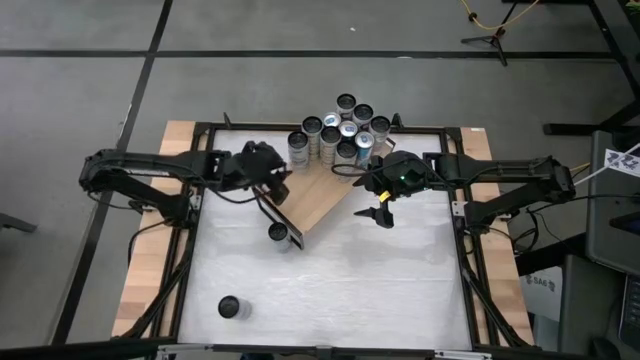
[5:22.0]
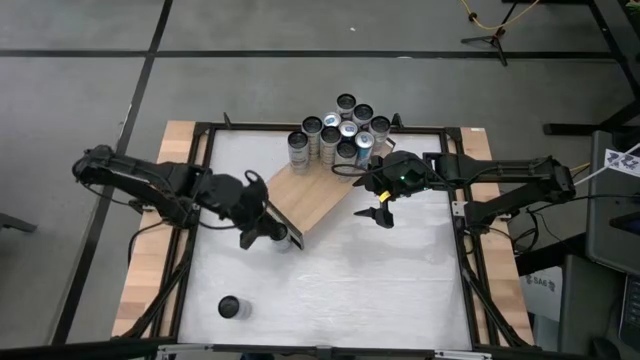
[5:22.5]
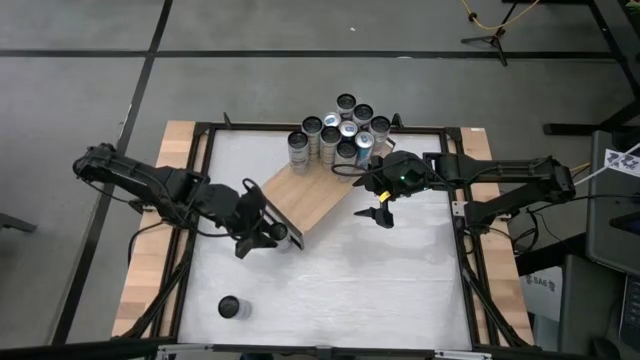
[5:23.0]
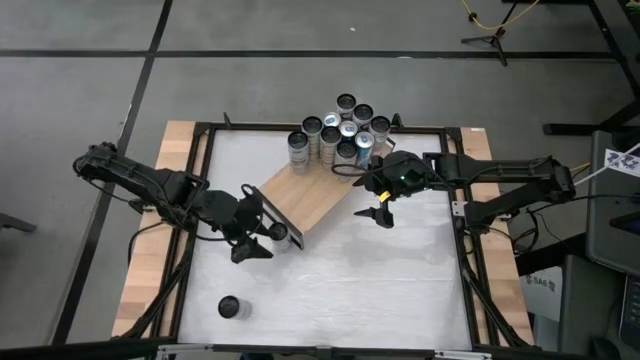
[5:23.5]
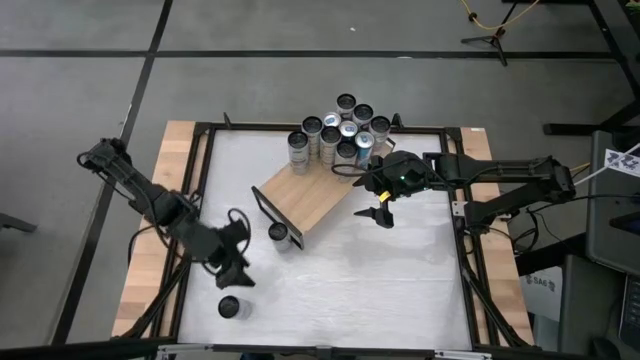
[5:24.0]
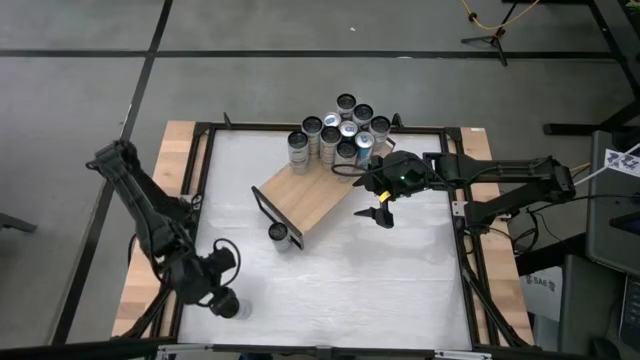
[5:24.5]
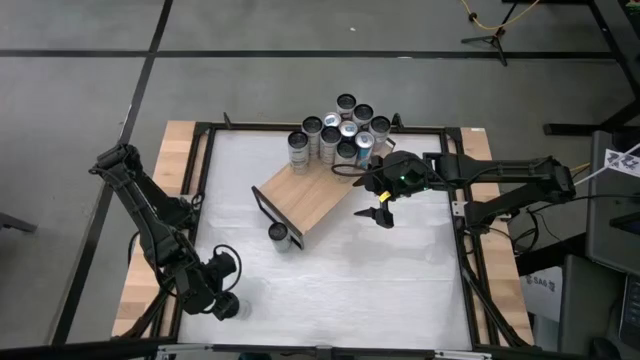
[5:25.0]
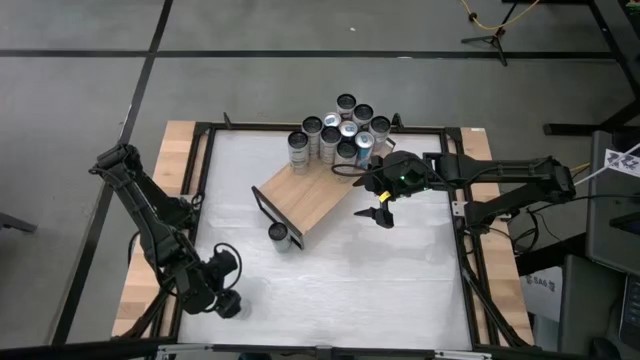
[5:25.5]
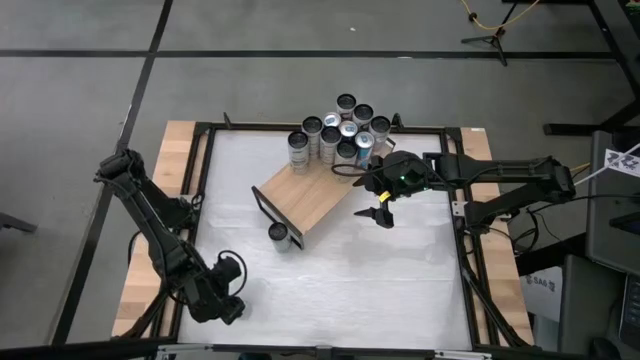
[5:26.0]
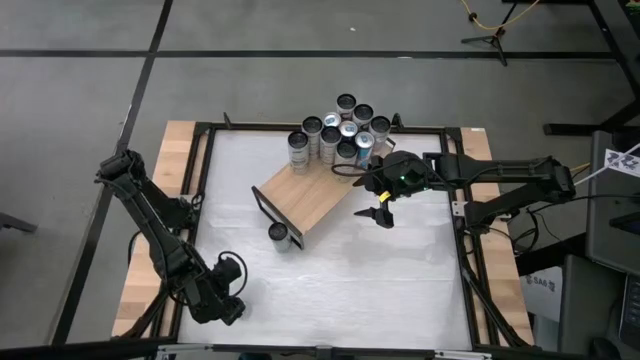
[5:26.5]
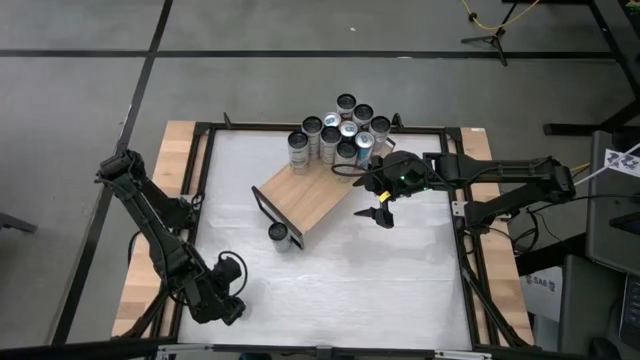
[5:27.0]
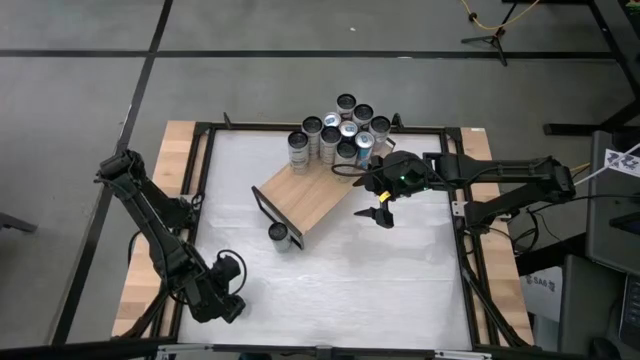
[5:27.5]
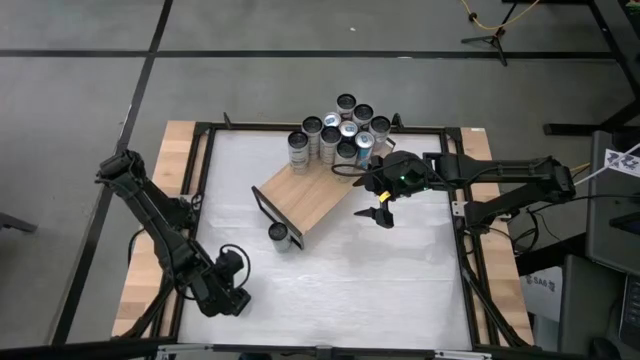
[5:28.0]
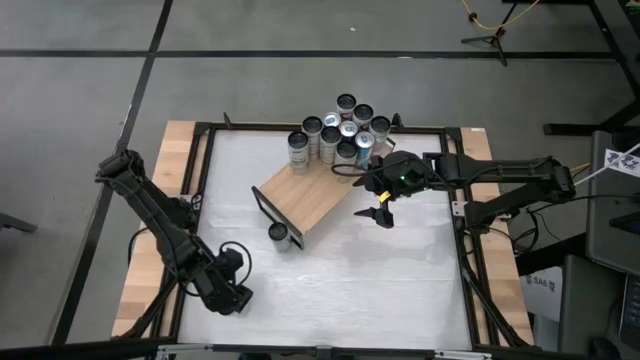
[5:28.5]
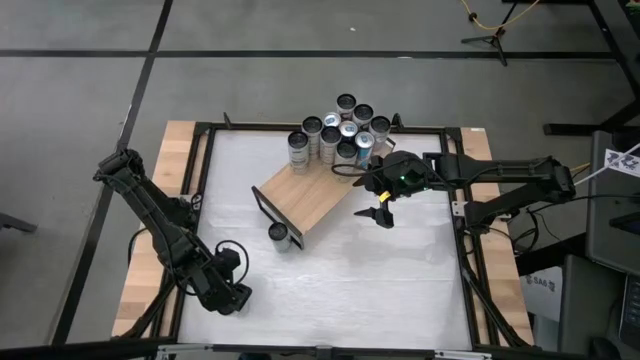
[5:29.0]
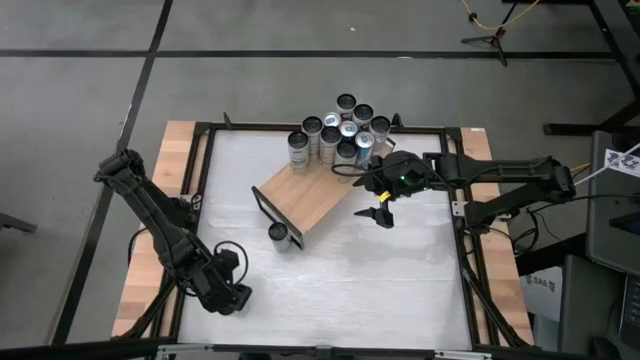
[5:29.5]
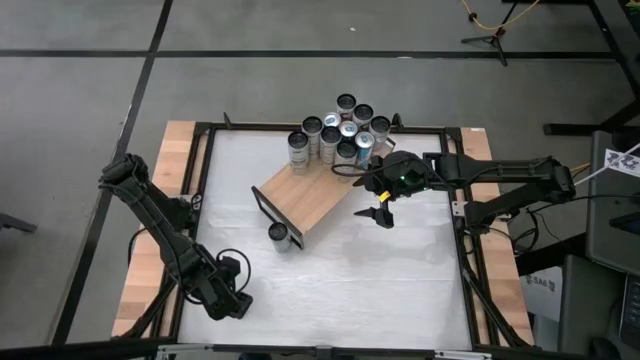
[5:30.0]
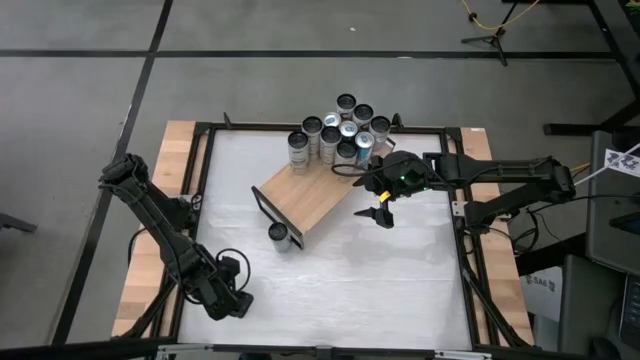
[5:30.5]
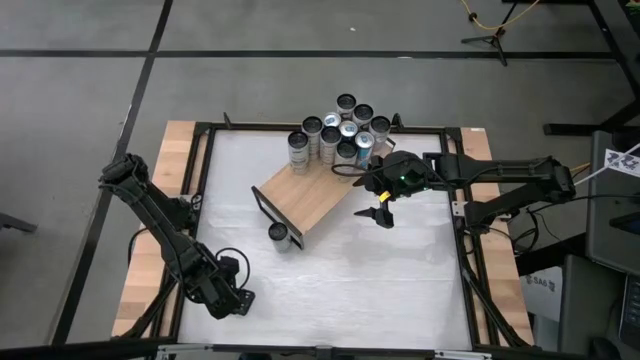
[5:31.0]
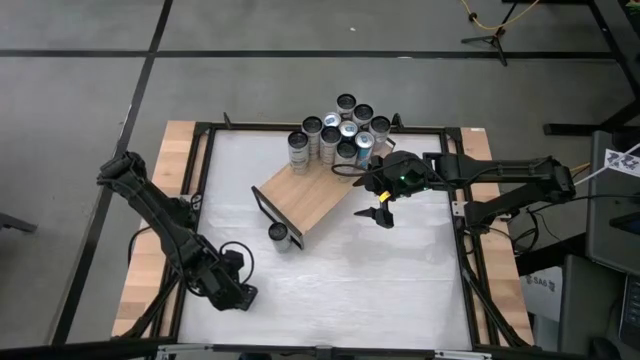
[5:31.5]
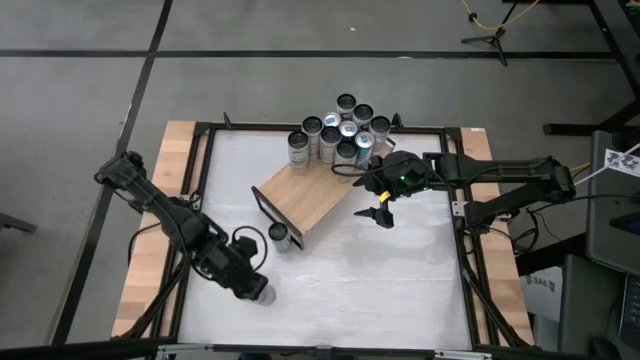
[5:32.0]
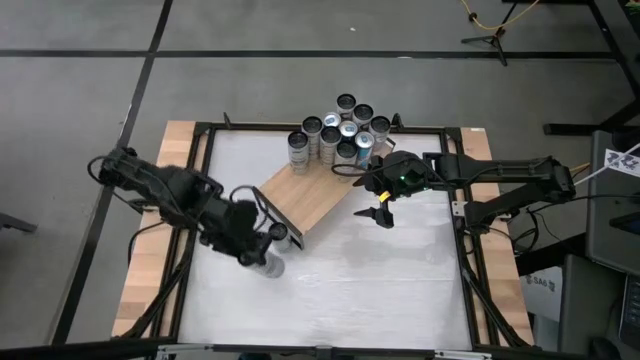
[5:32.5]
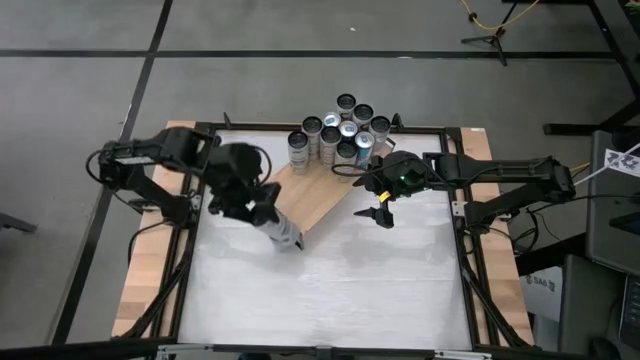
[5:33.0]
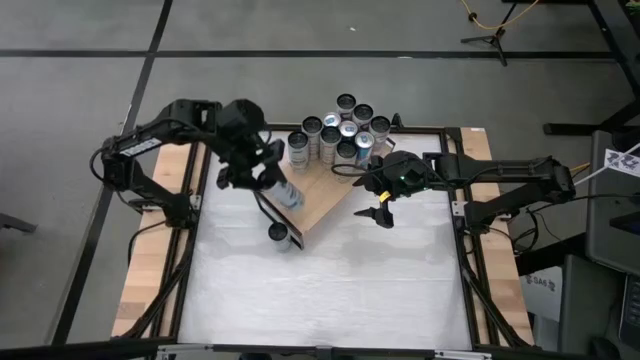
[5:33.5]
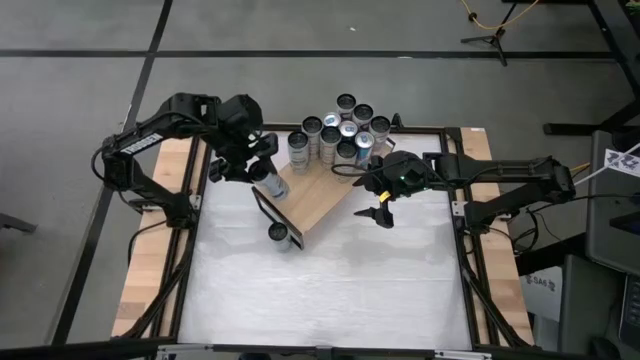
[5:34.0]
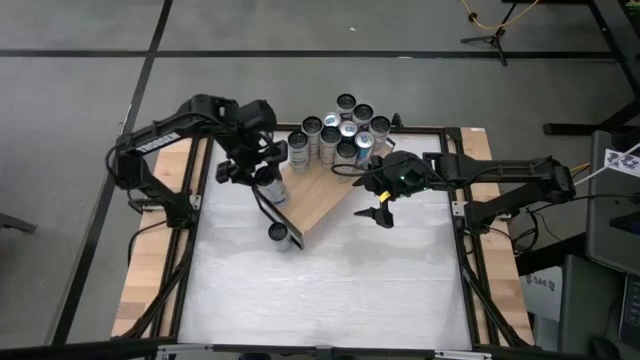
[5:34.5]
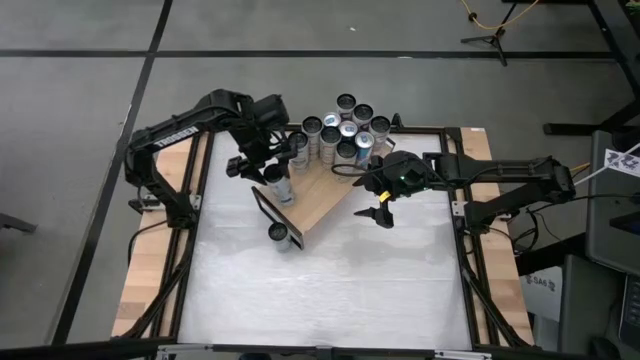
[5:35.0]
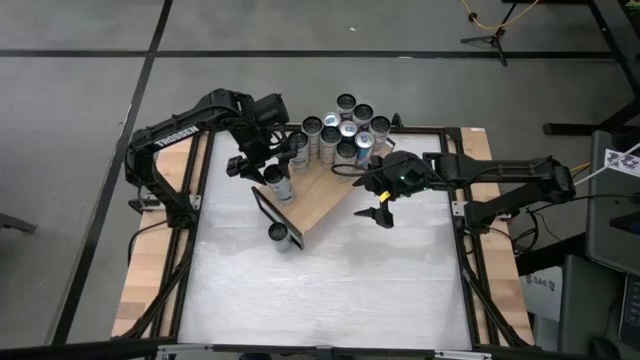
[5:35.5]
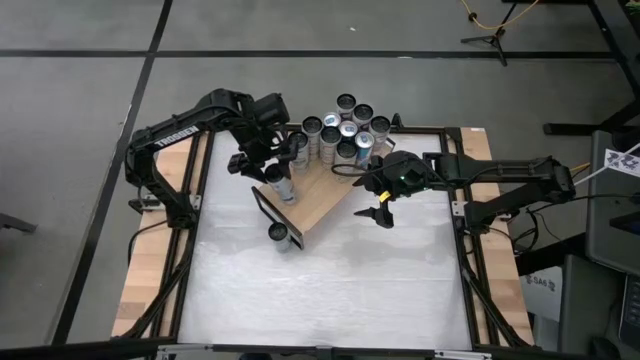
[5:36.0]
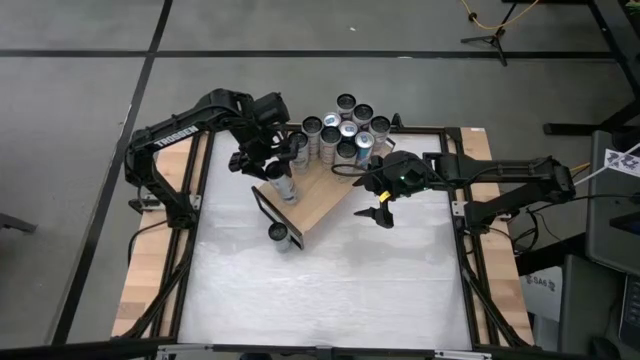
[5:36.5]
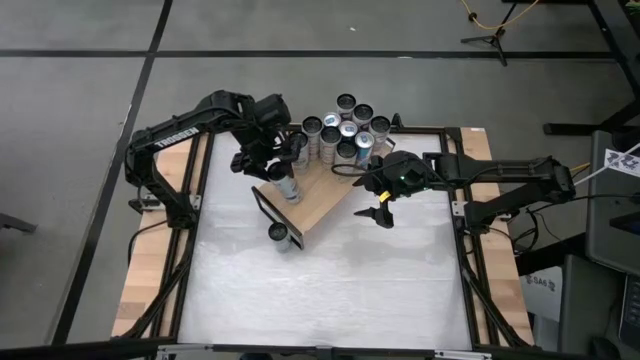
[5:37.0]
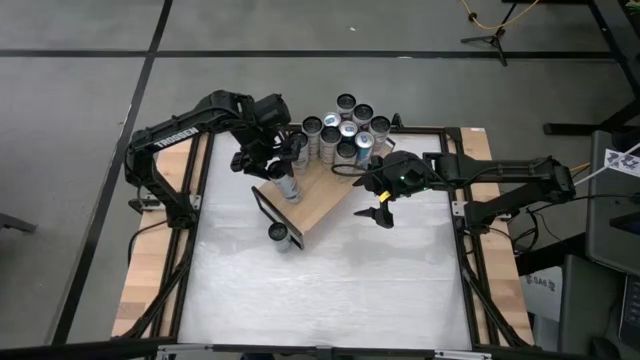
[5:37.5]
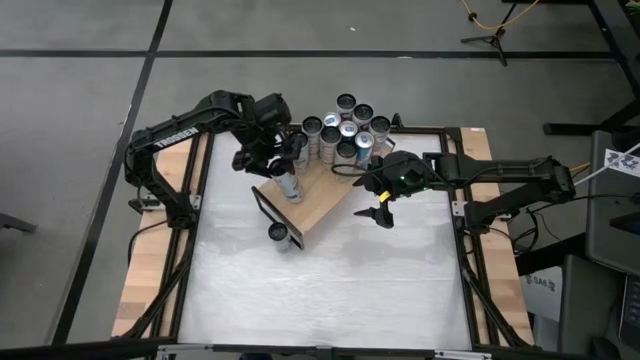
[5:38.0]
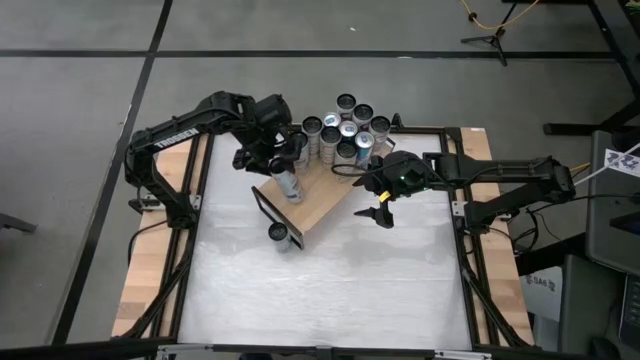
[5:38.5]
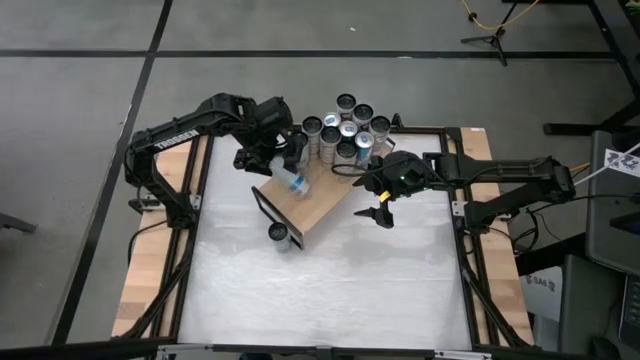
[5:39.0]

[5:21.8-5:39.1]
Task: Place canned beverage on shelf
Put the white-blue soda can on the shelf aligned with the other white-blue soda can

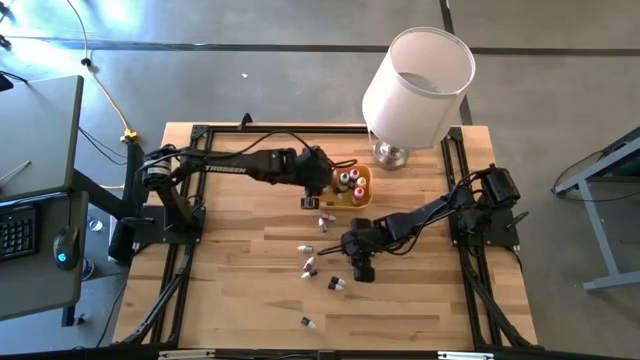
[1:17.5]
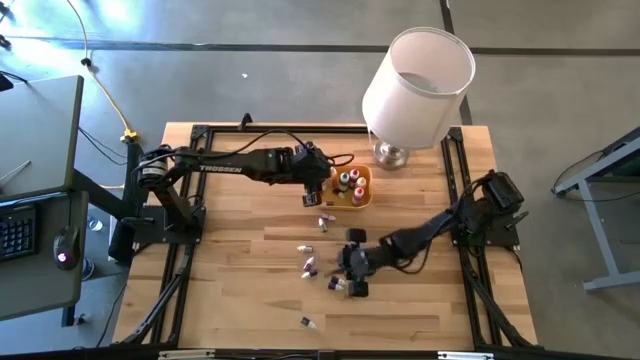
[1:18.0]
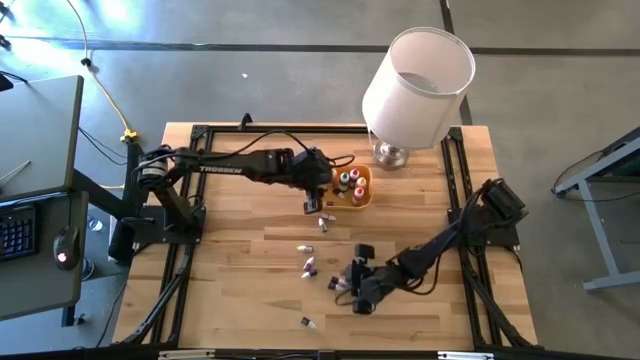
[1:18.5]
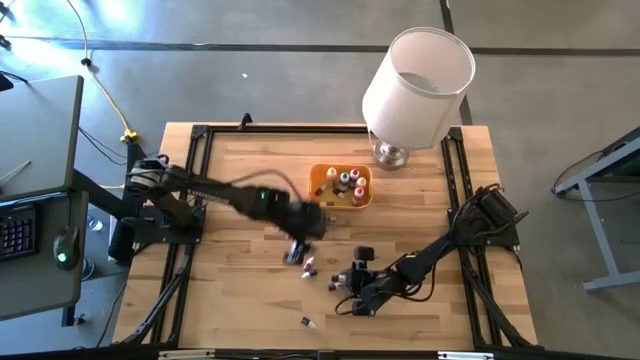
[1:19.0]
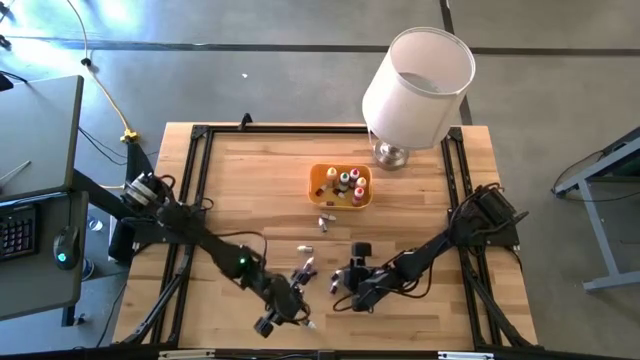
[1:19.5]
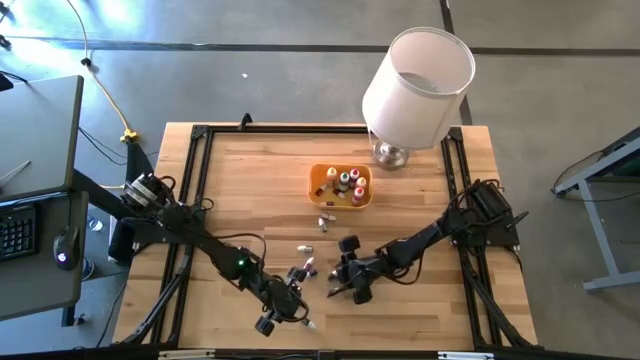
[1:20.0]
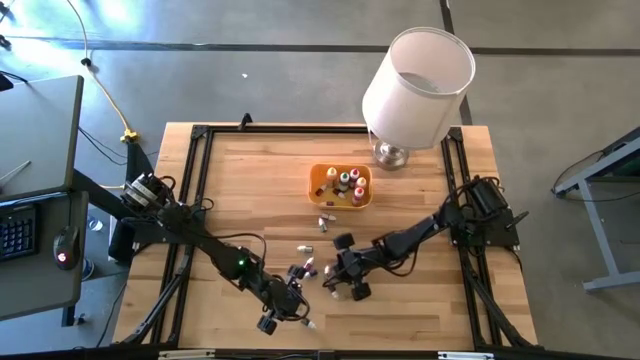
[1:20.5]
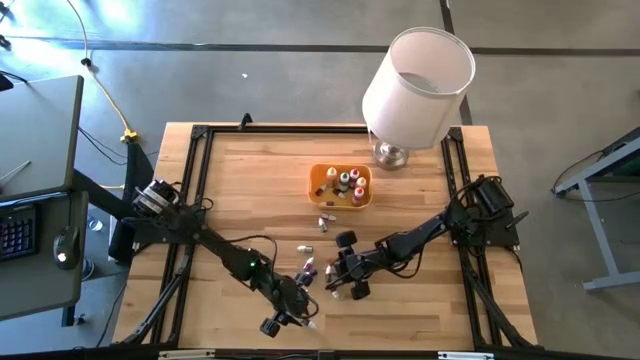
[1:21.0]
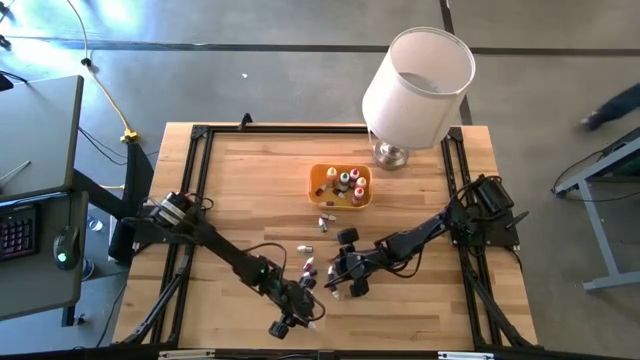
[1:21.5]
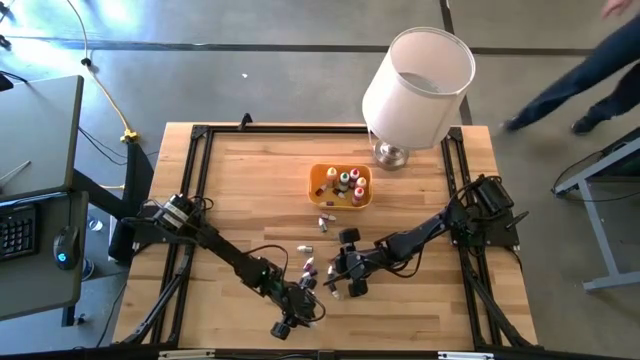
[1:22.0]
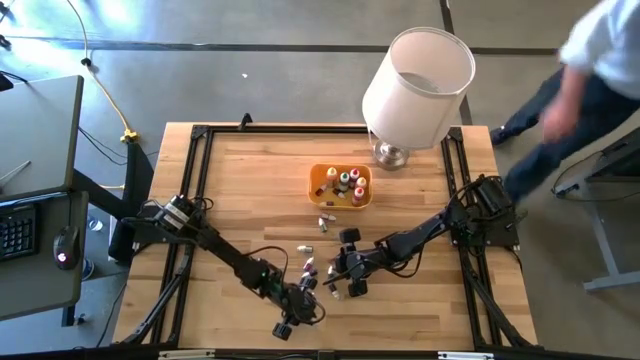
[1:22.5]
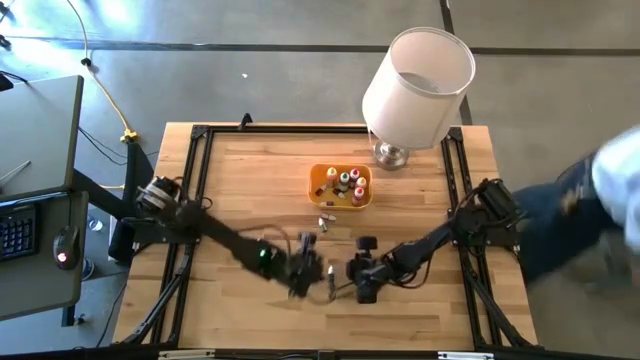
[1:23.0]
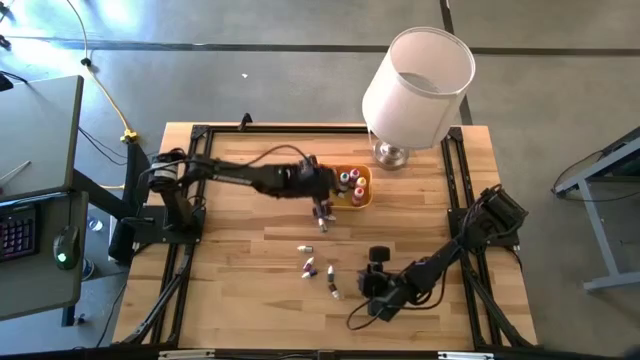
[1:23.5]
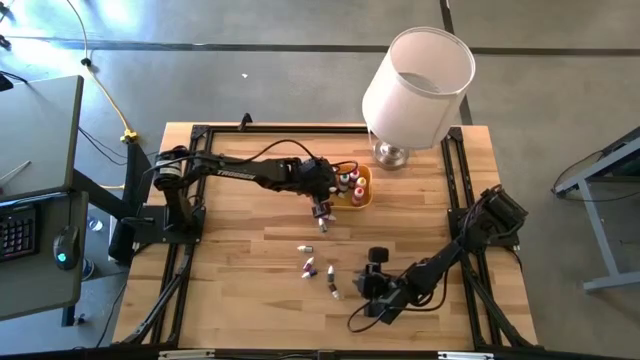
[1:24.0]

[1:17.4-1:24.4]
Task: Pick & Place food coloring
Put the small green food coloring bottle into the yellow container
